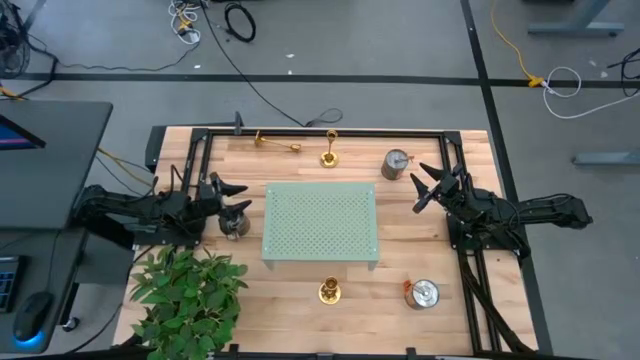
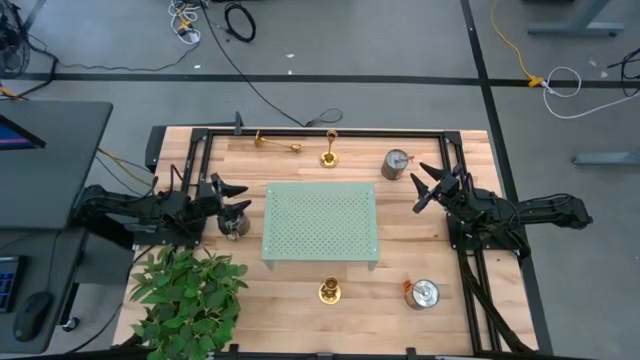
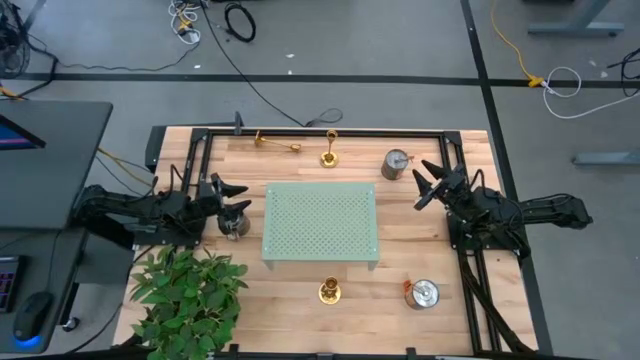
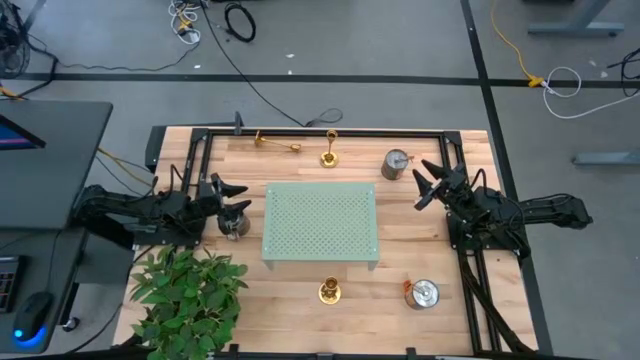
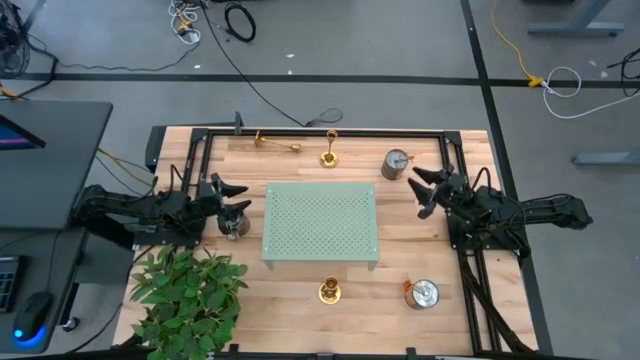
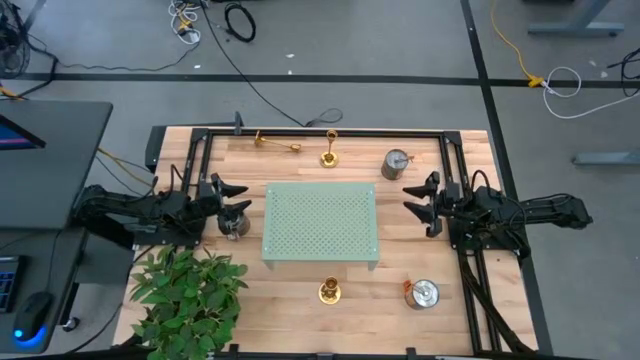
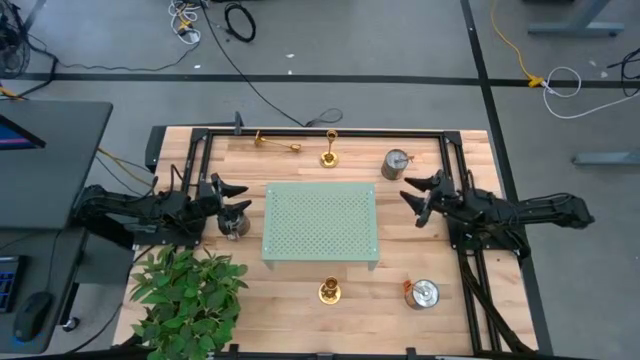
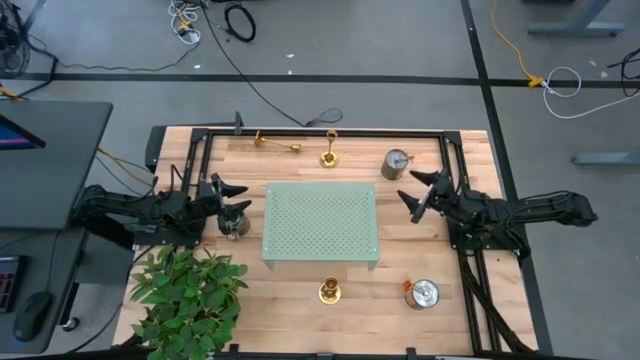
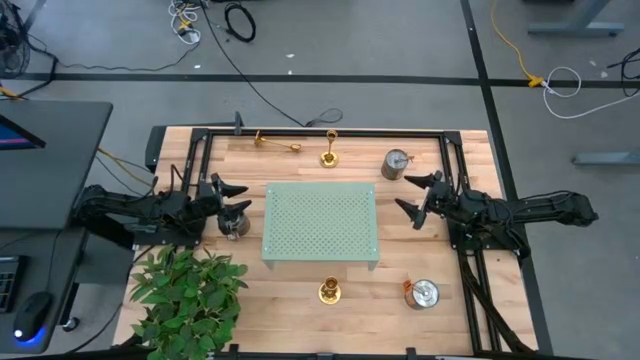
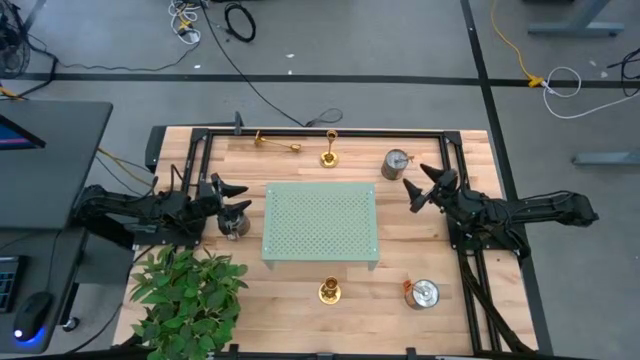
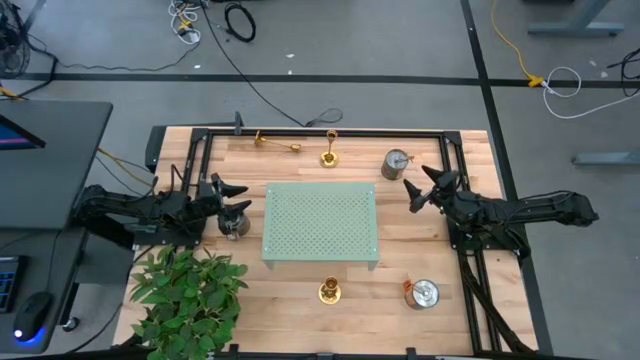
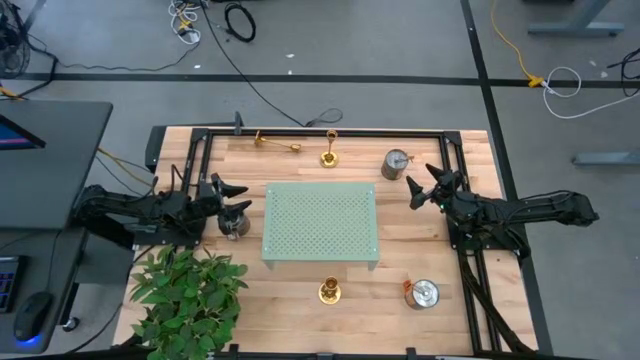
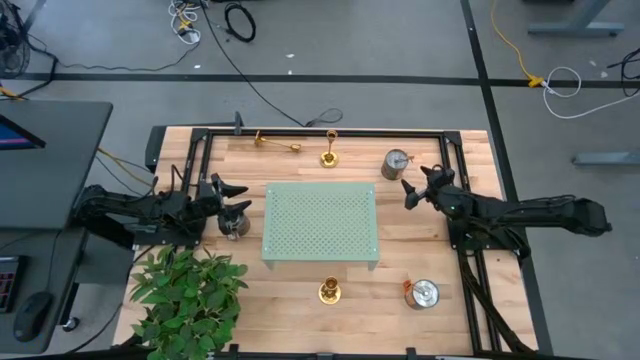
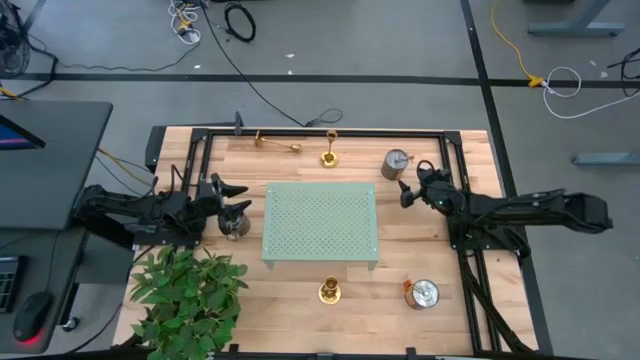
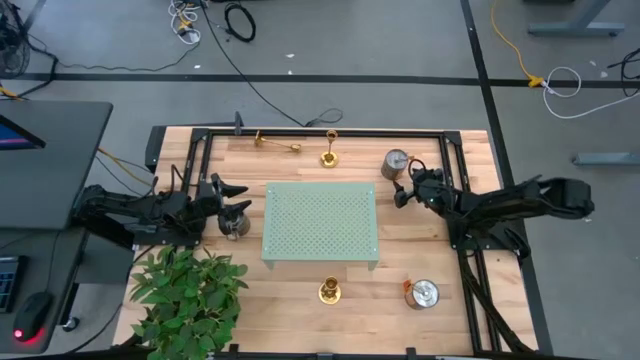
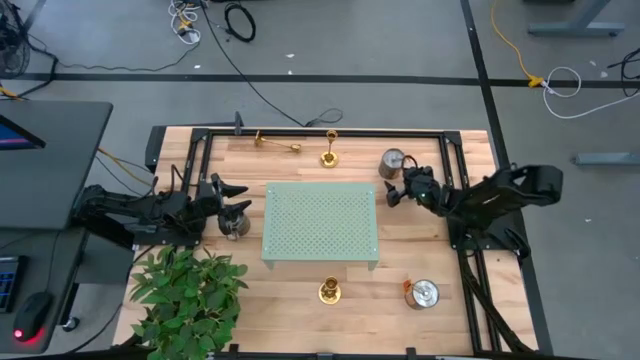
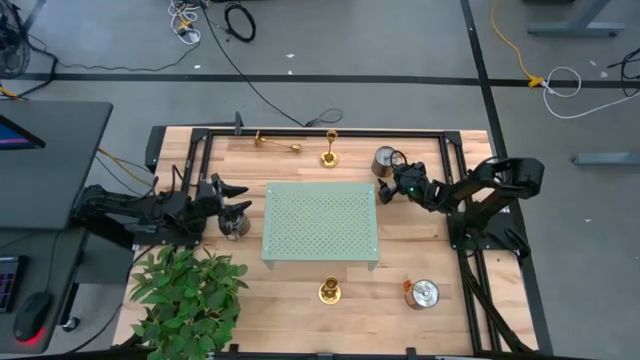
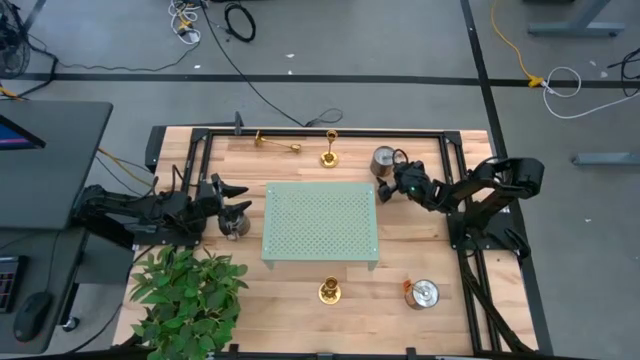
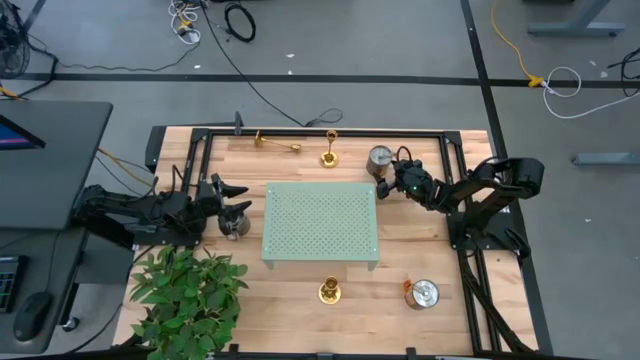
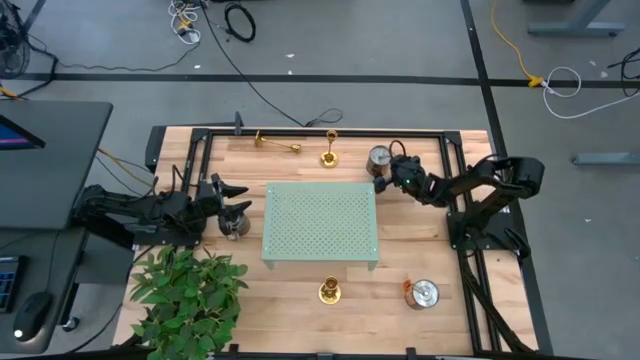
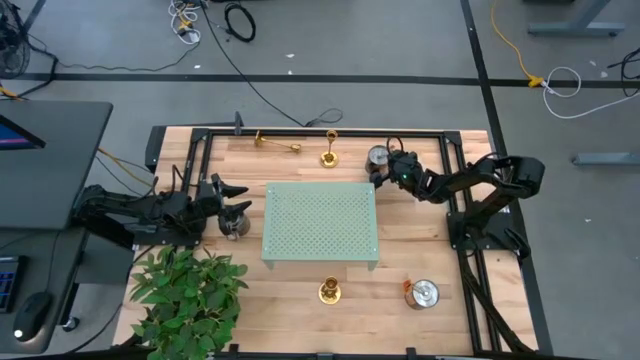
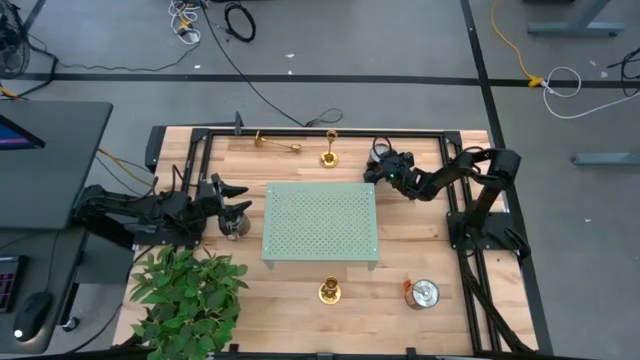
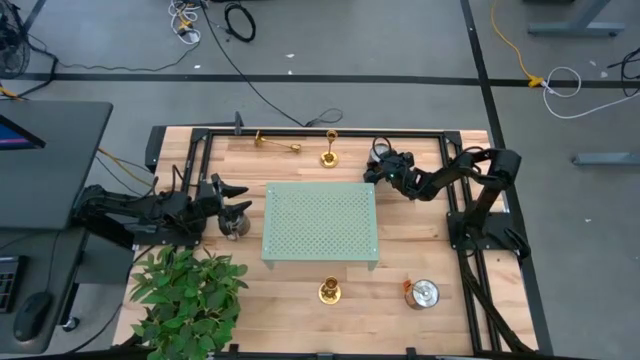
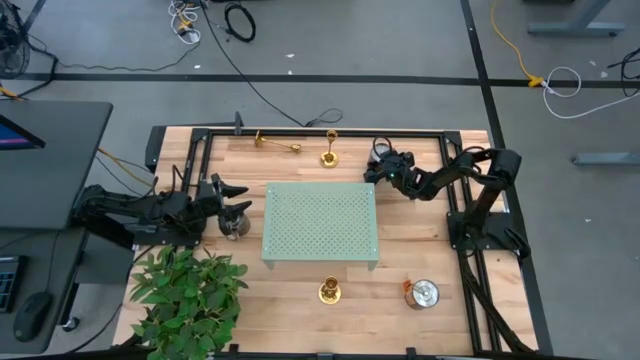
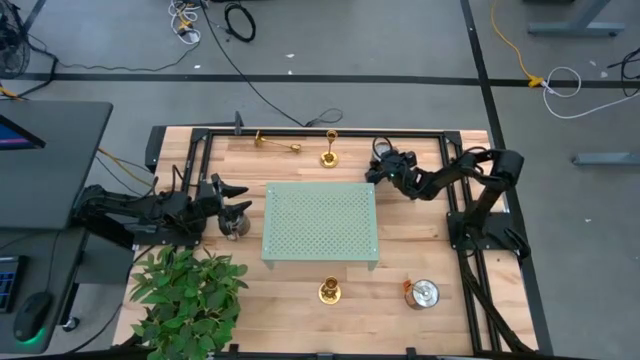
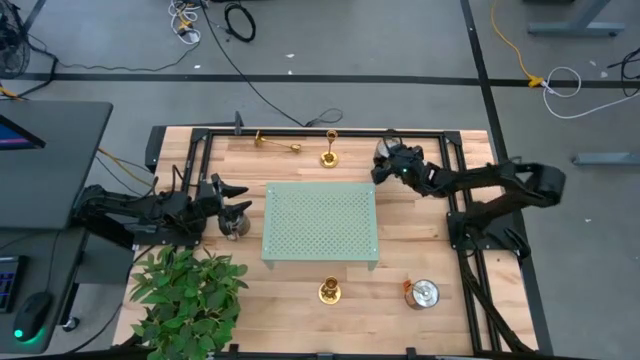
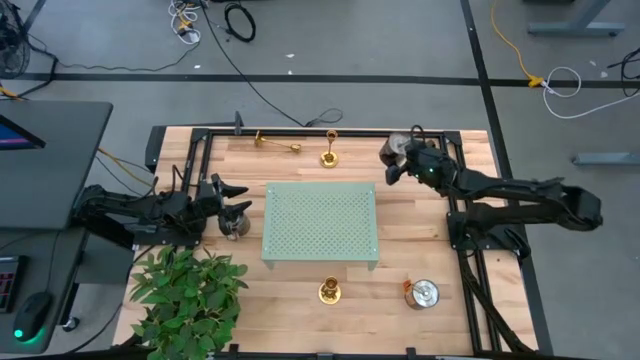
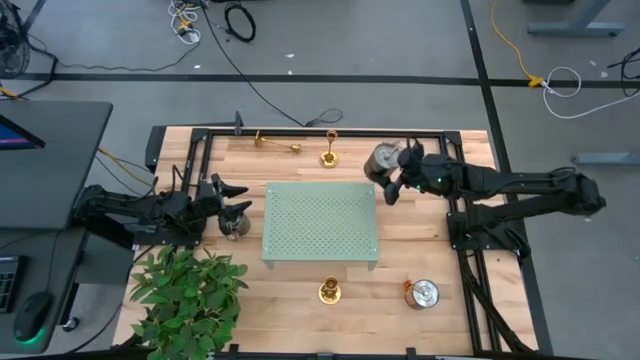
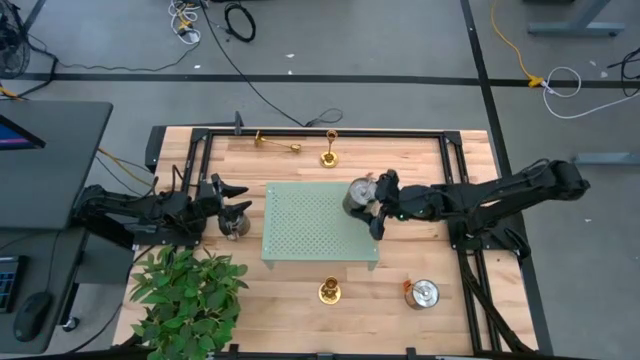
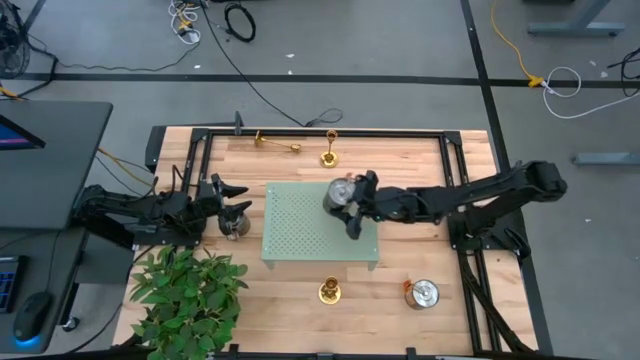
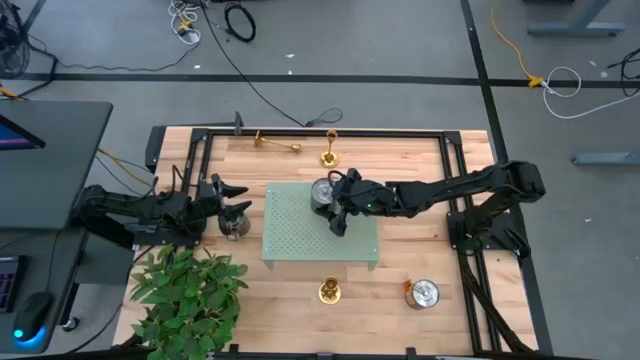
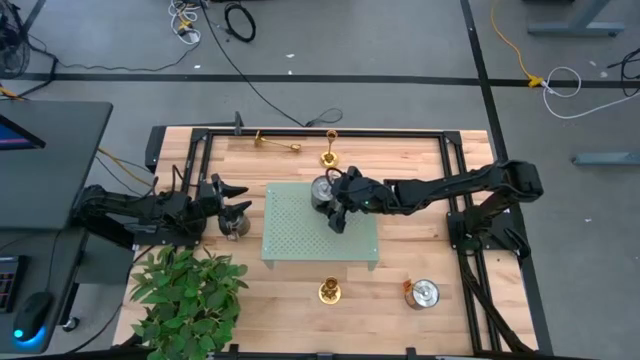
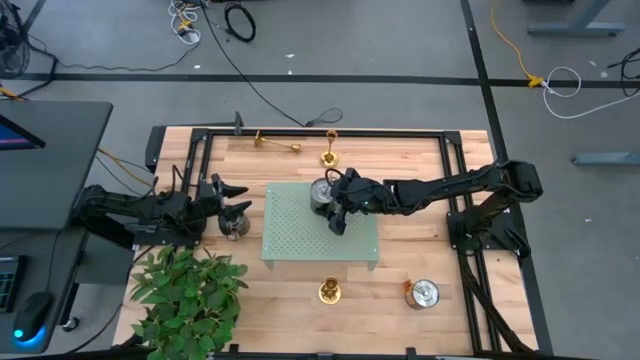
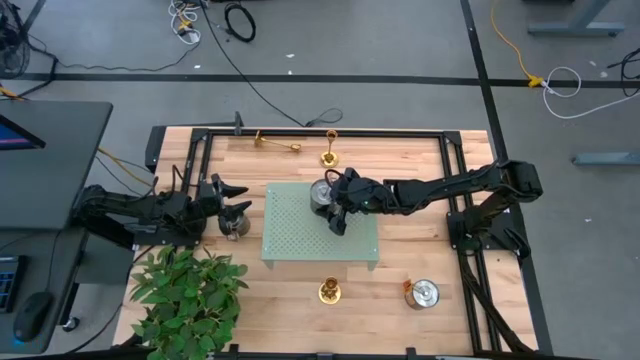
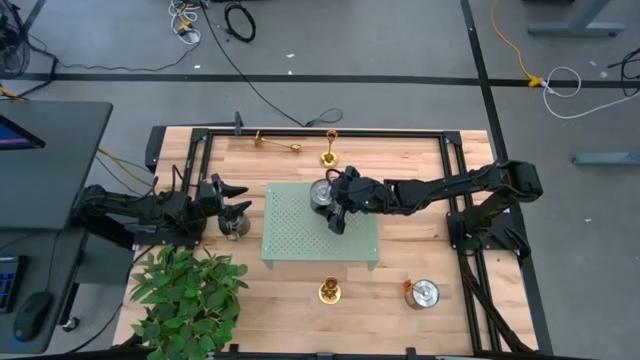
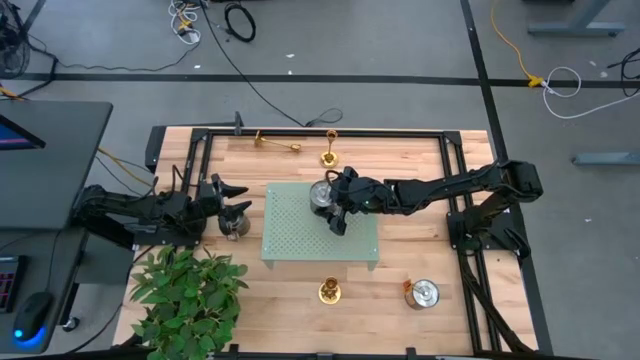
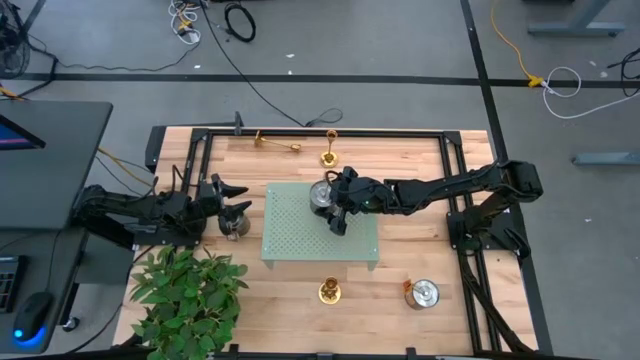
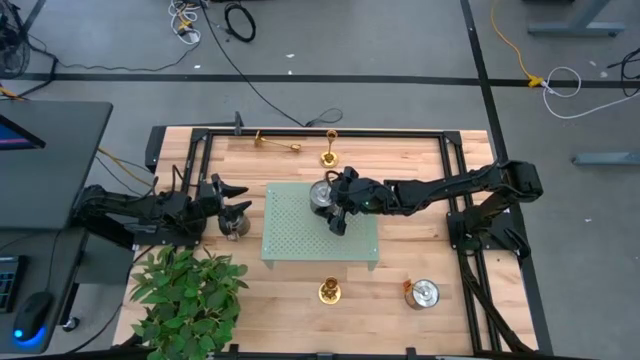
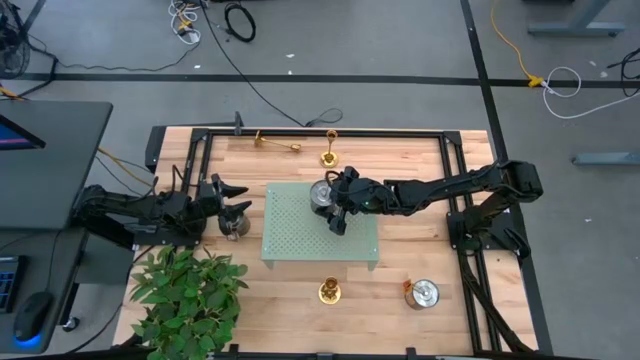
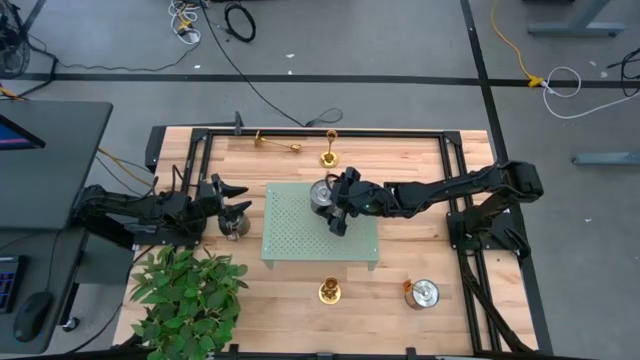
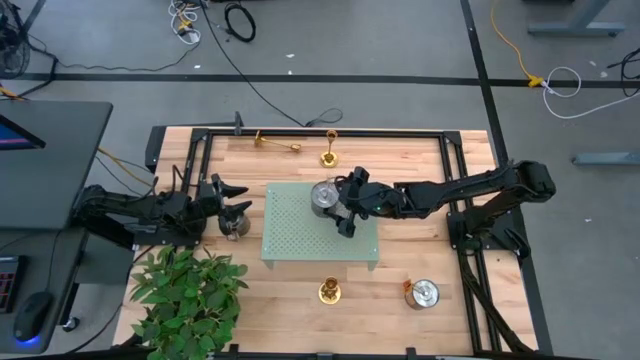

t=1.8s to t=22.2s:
Task: Pick & Place candle stick holders
Put the top orange scented candle on the shelf
